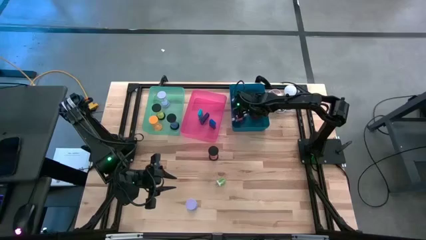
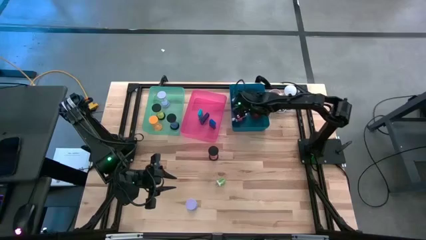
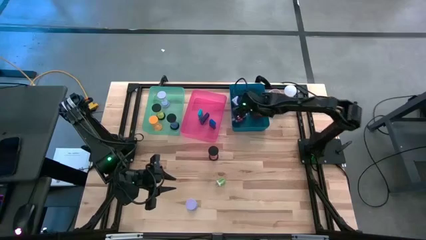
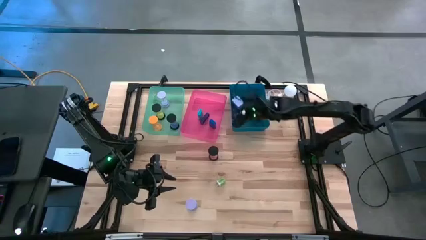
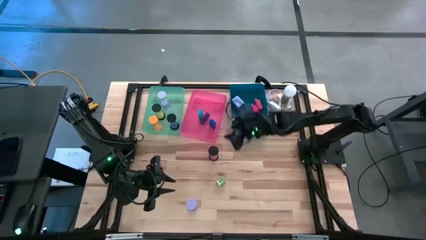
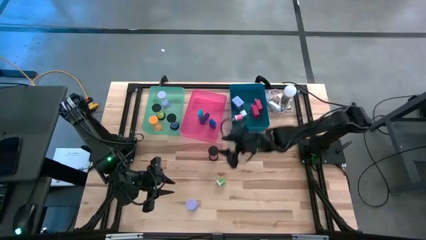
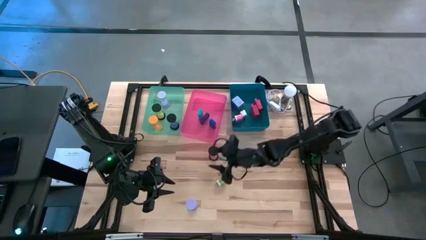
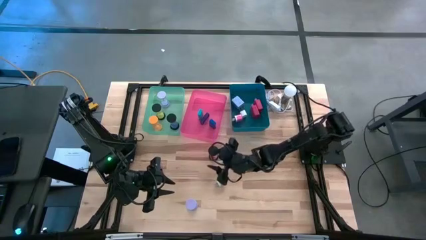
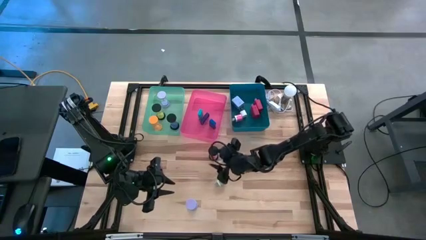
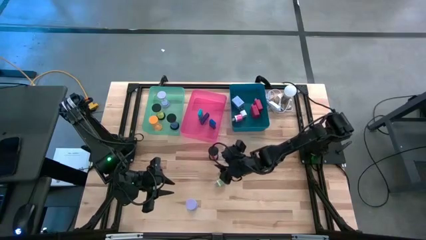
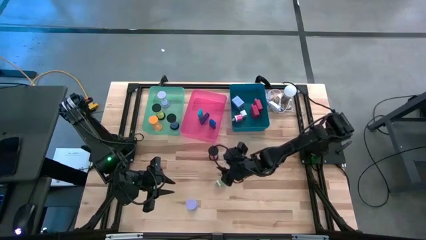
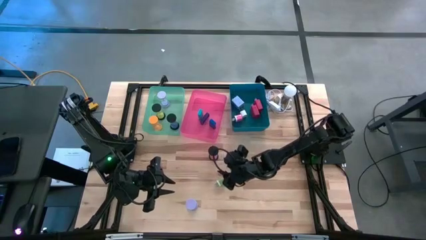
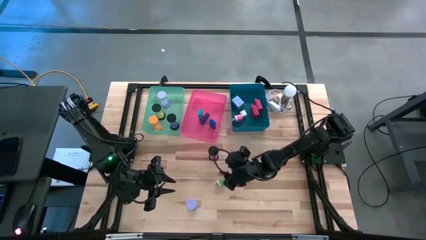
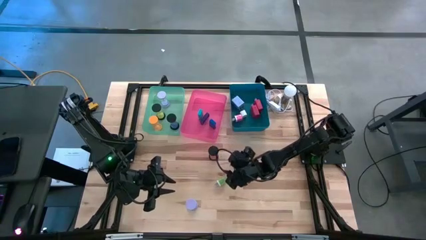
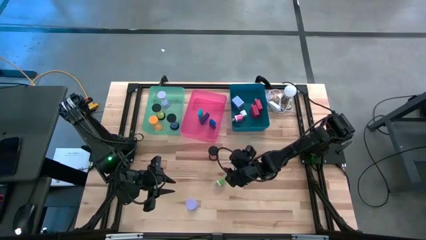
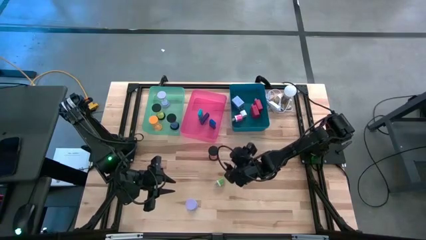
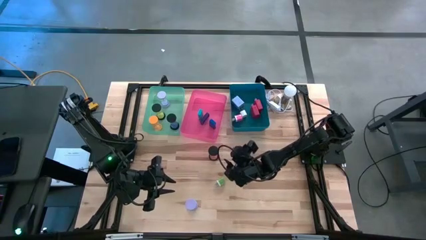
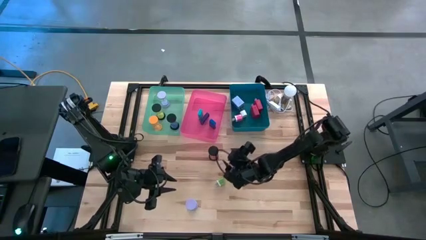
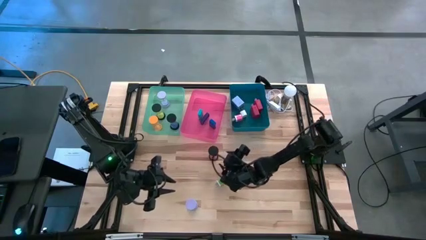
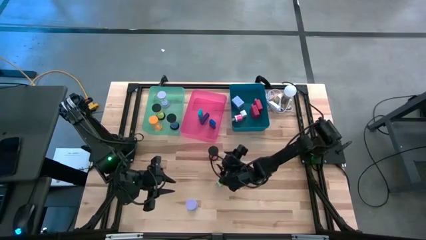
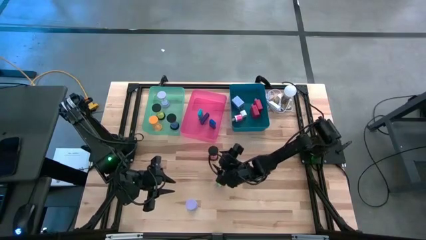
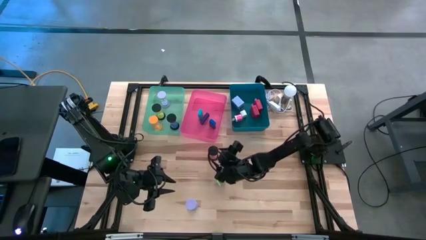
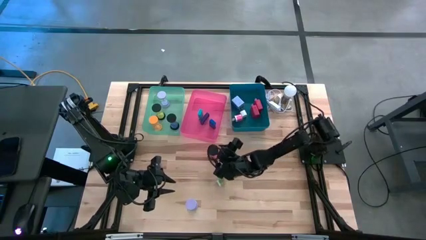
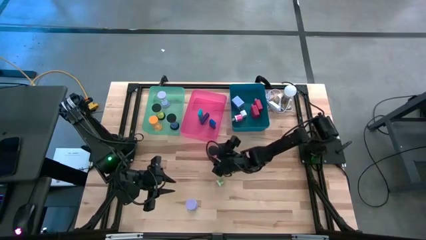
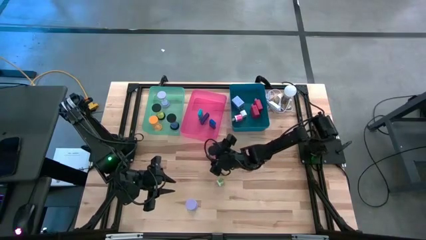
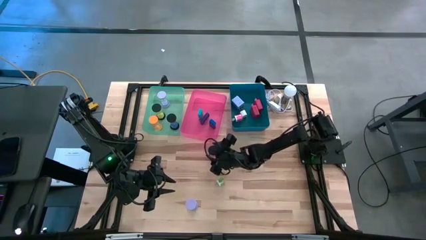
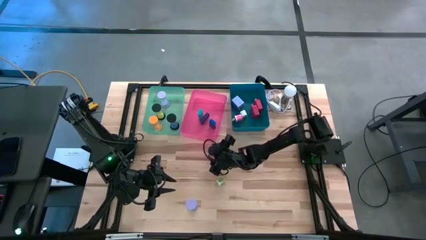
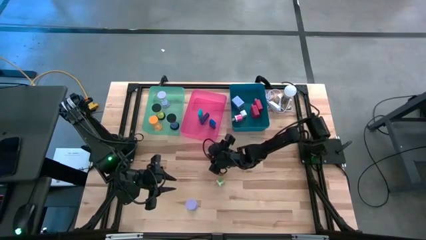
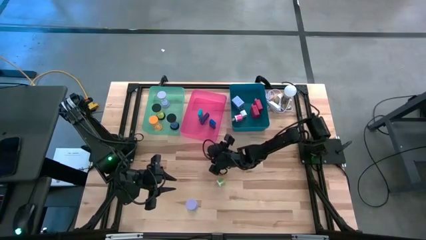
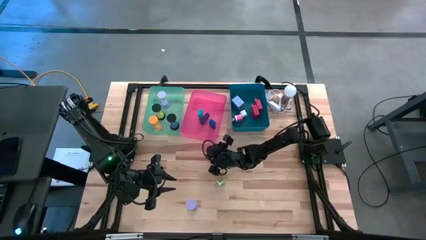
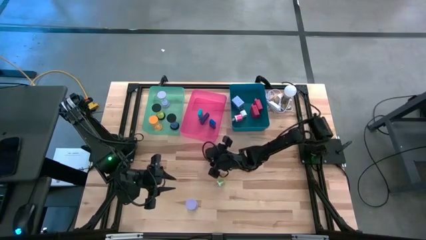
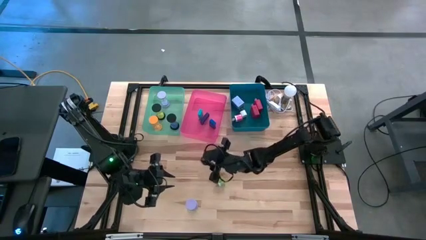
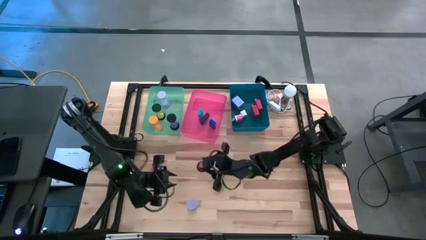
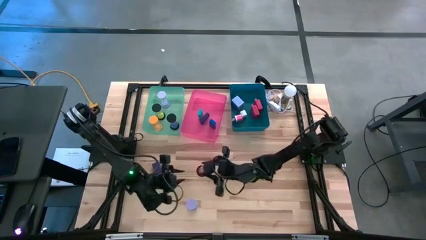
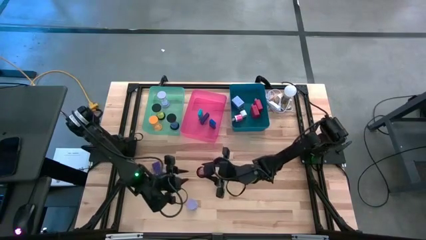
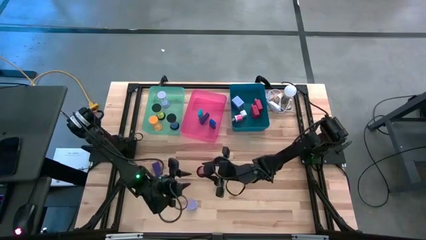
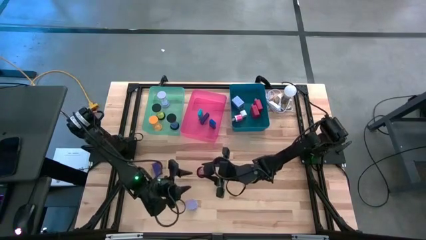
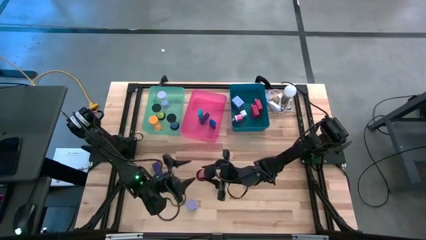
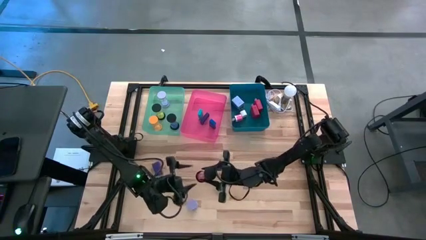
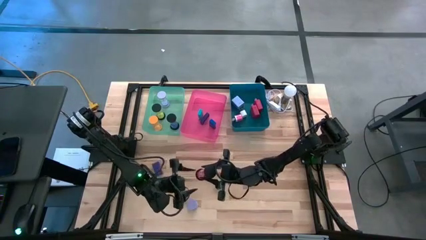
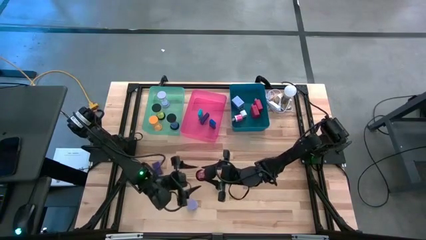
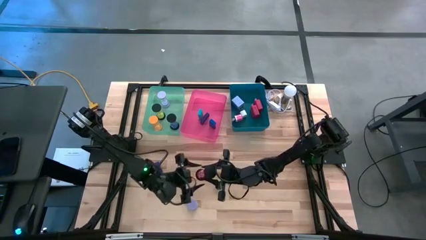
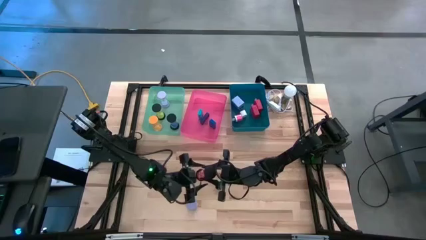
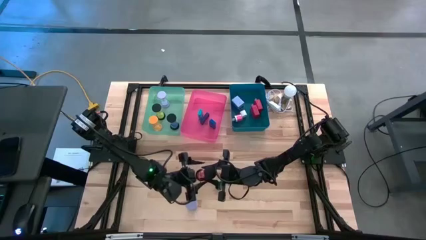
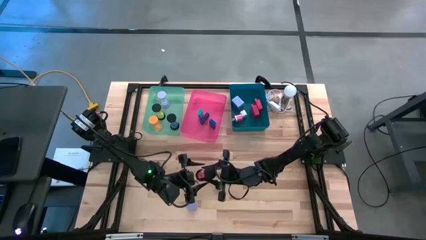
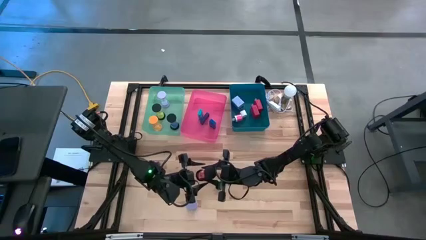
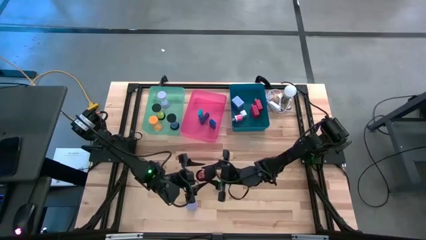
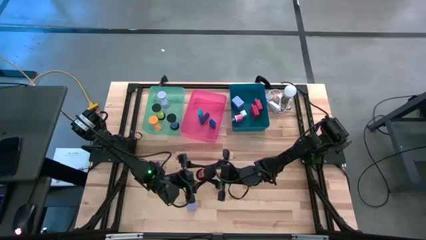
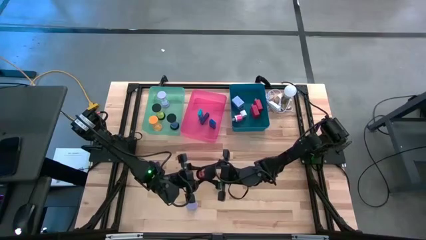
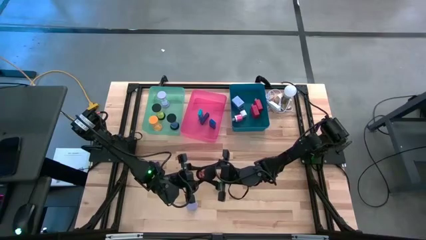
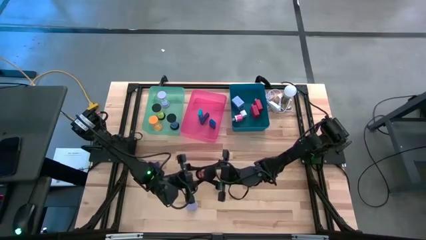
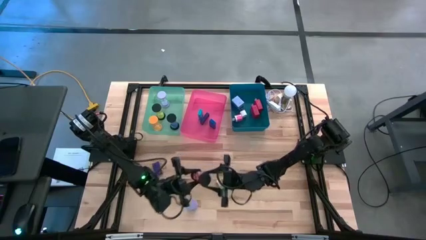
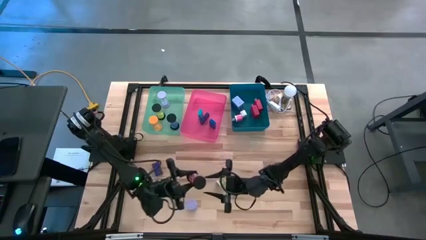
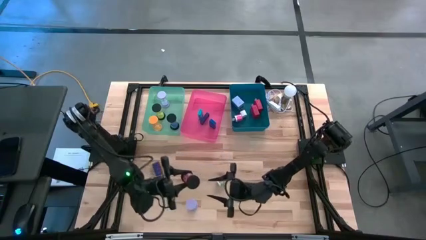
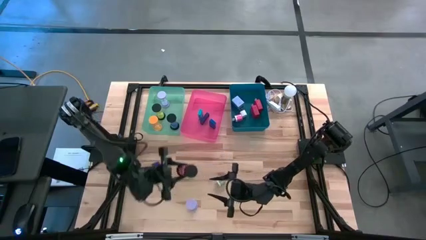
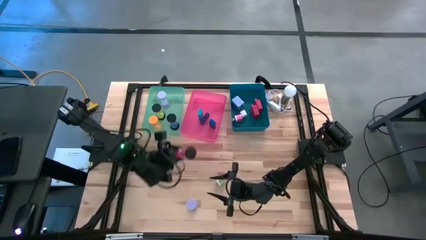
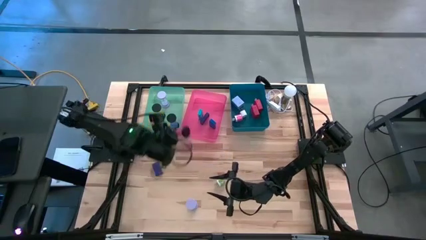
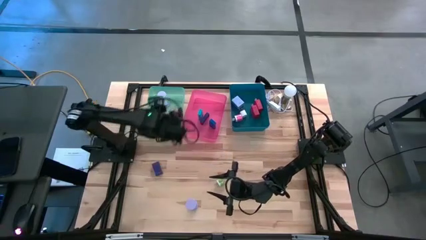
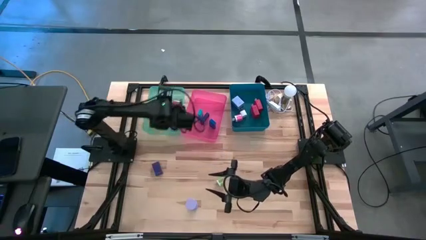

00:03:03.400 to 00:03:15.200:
Task: Pick & Place Office items
Put the red hourglass into the green bin
